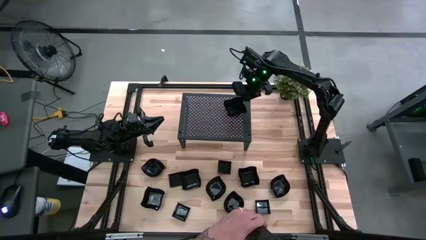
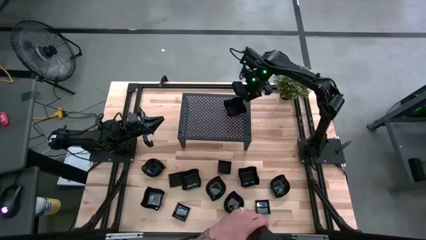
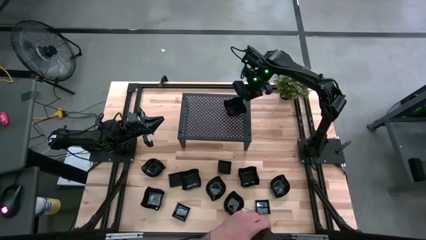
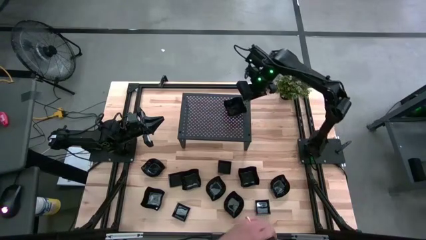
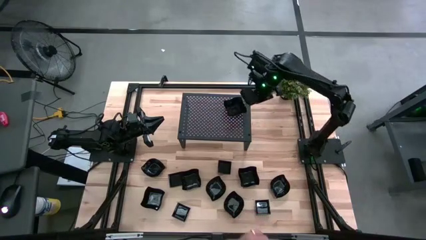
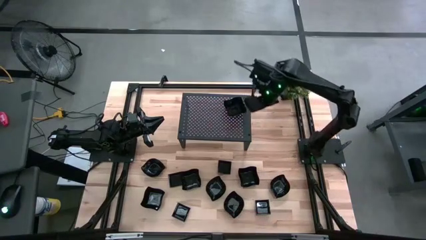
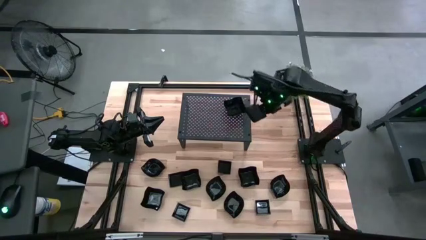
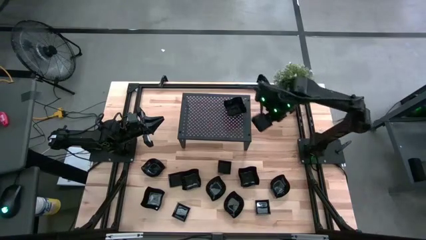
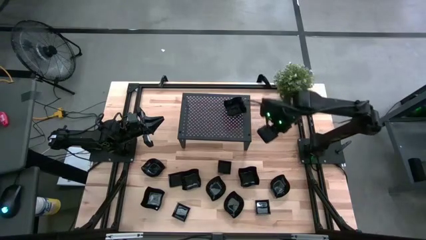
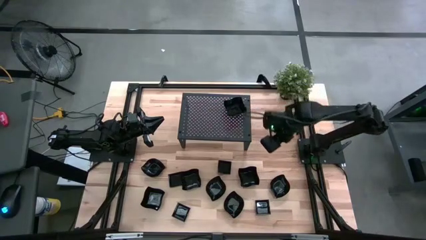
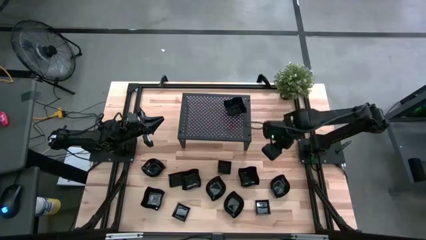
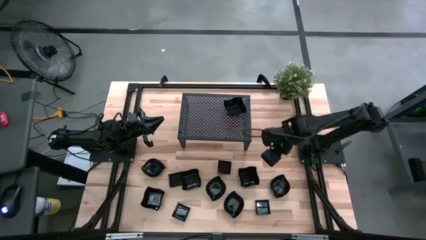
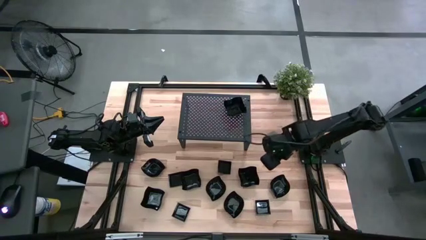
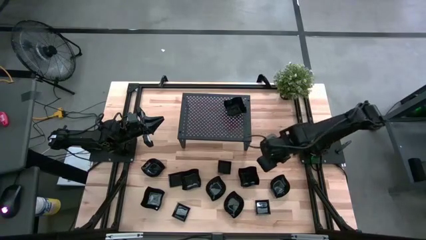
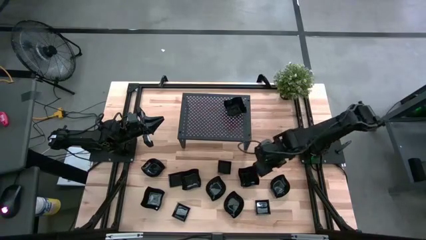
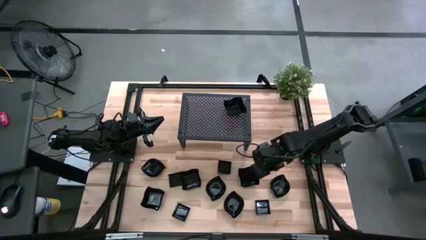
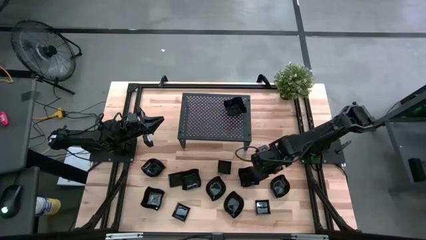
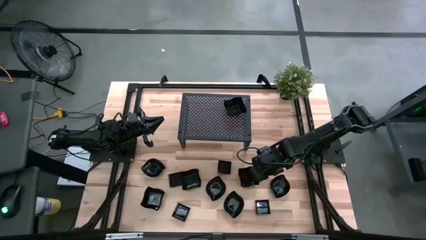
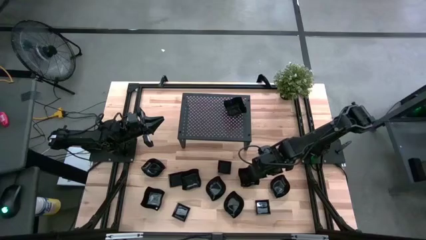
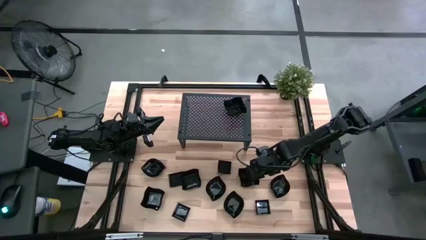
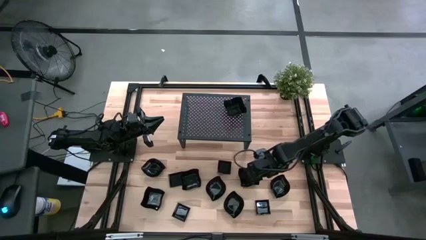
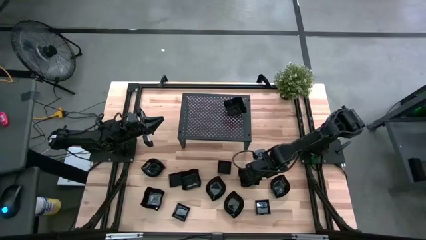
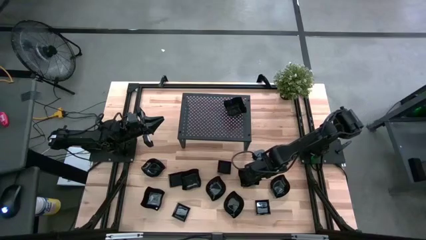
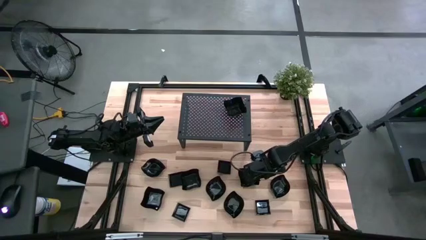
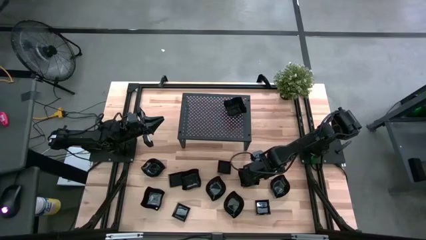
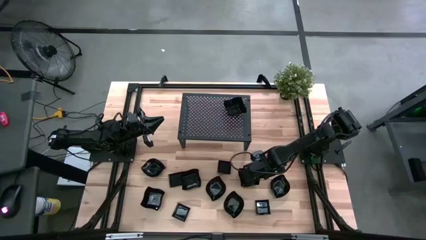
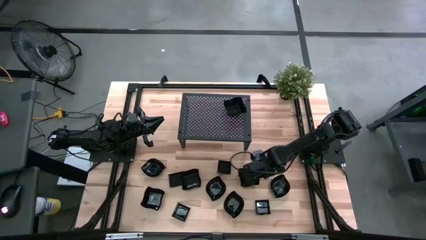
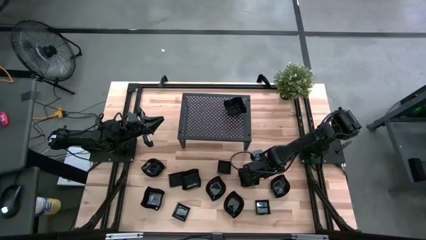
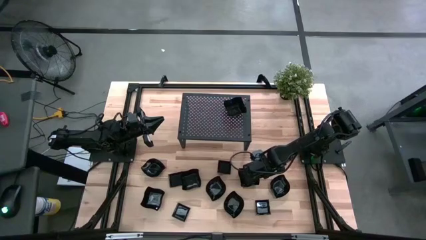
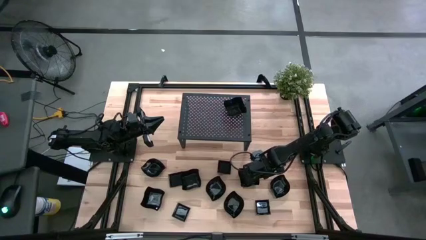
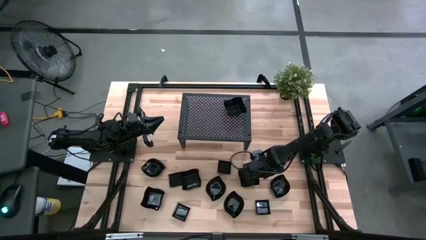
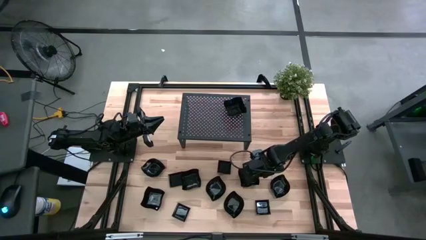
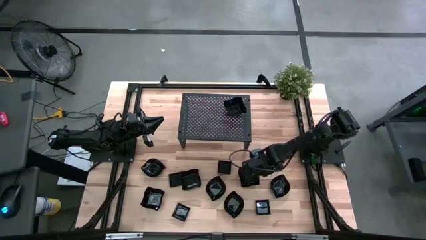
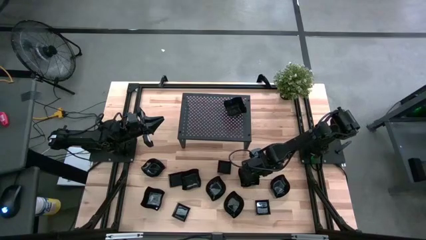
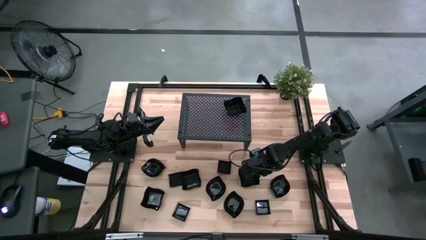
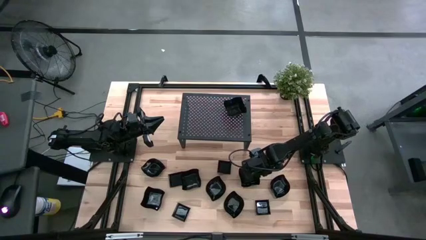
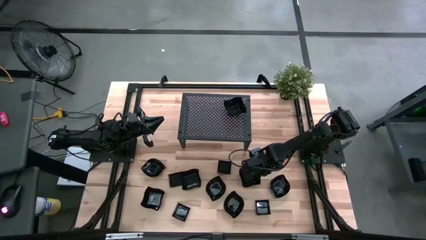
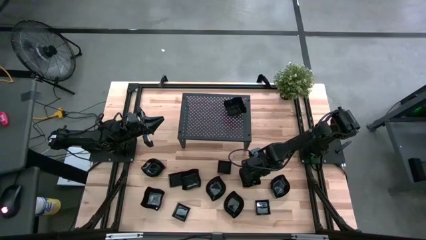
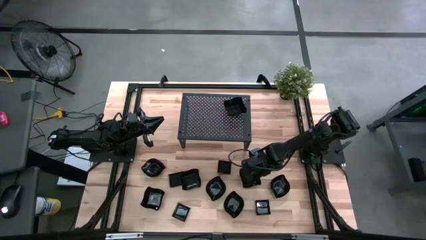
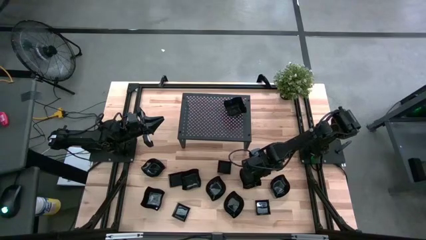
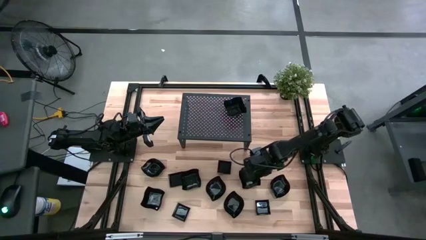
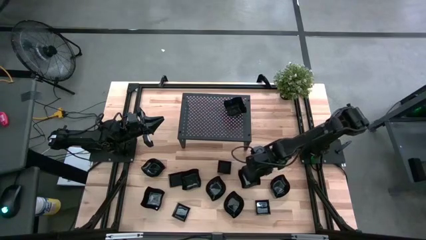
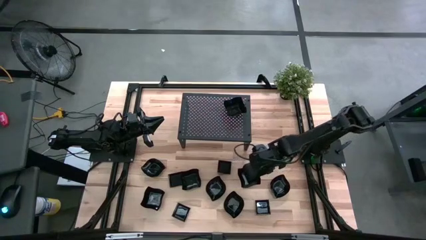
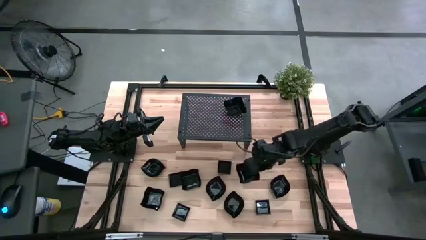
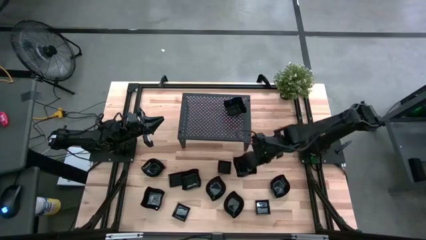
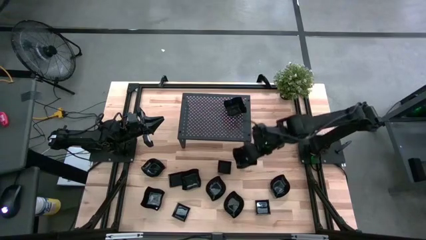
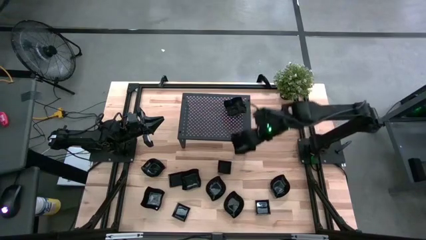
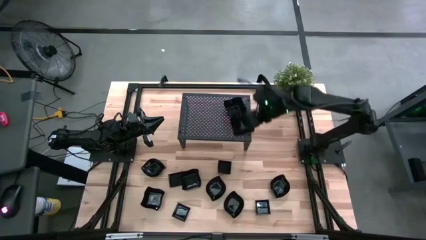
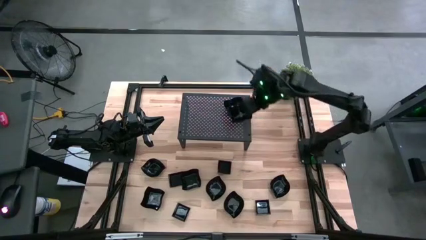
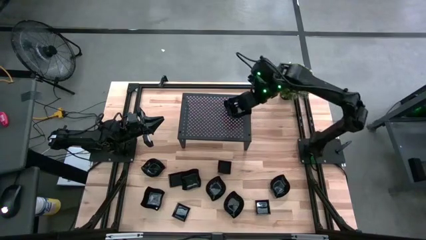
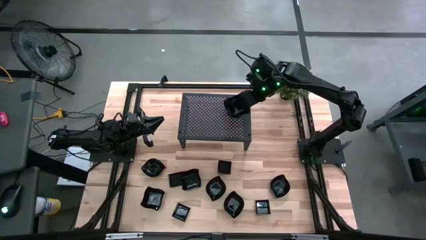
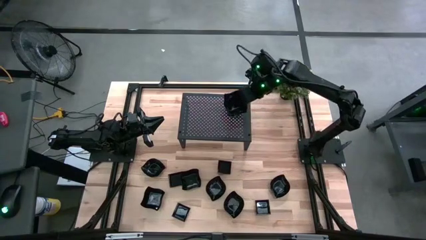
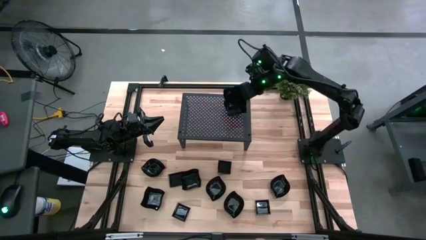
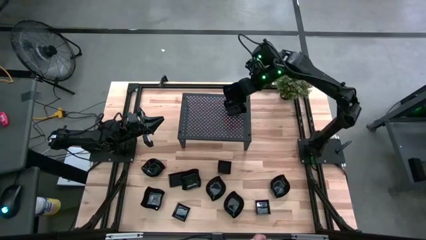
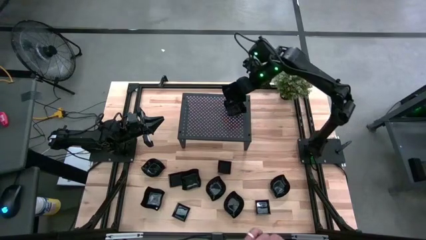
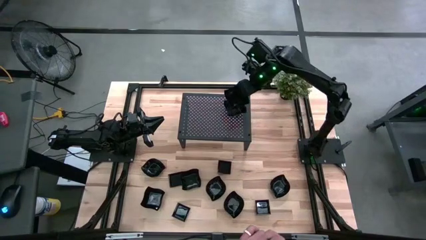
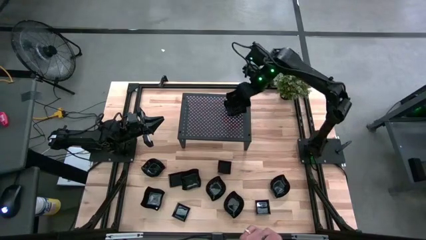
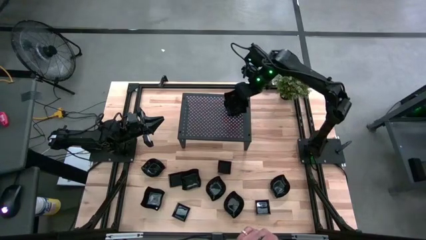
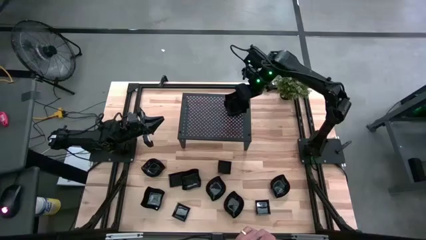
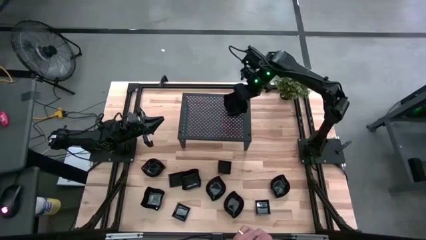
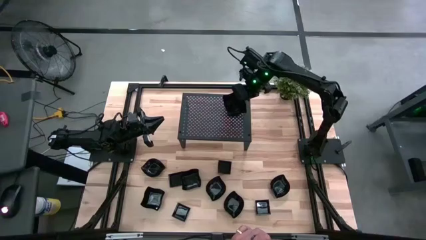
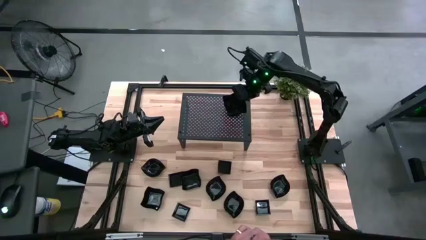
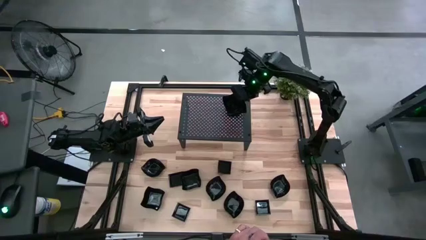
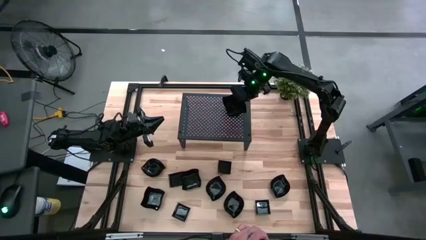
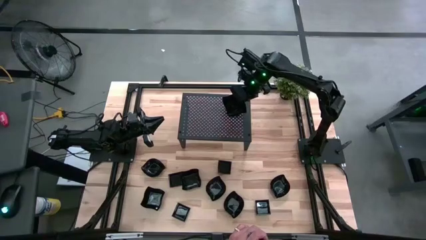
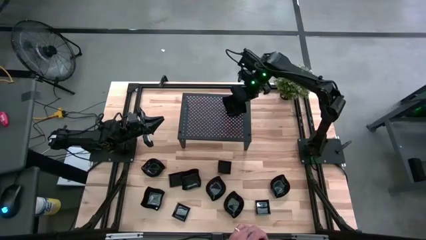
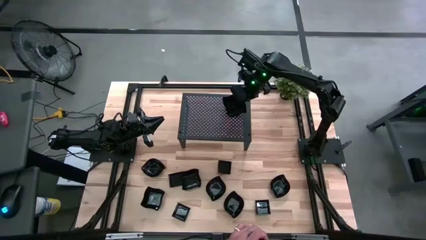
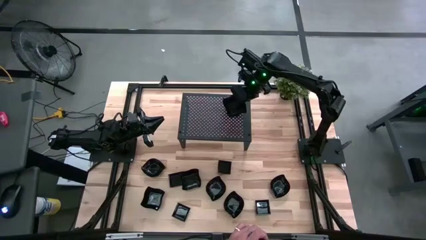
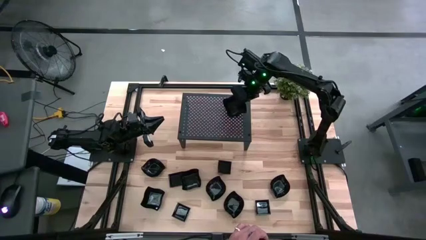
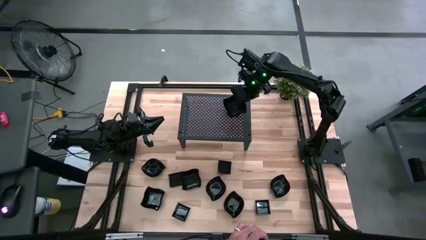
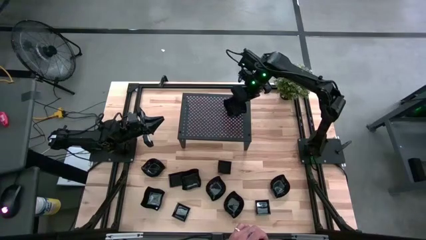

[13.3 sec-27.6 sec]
Task: Pick & Place Mini shaped plates
Stack the black distorted plate on top of the black distorted plate on the shelf
